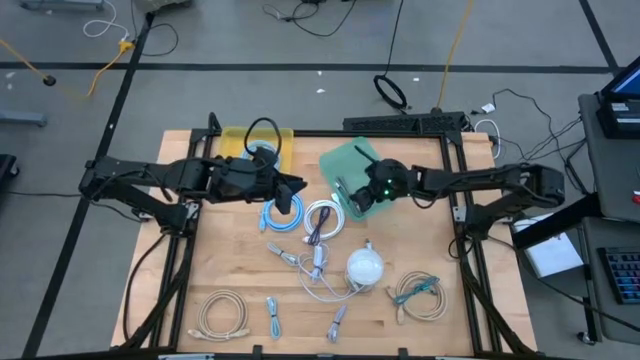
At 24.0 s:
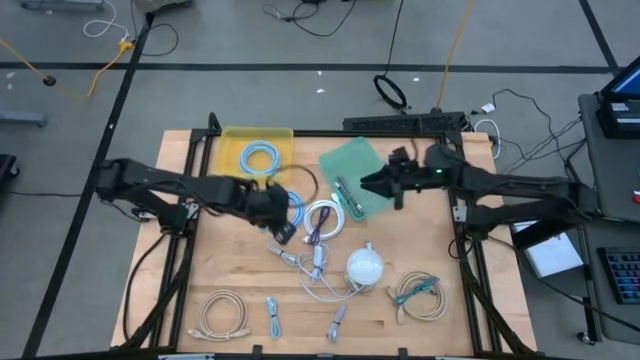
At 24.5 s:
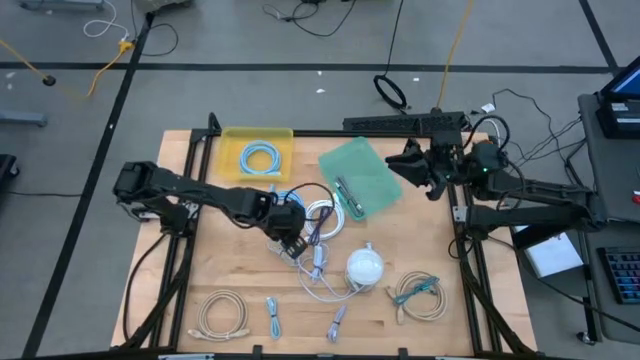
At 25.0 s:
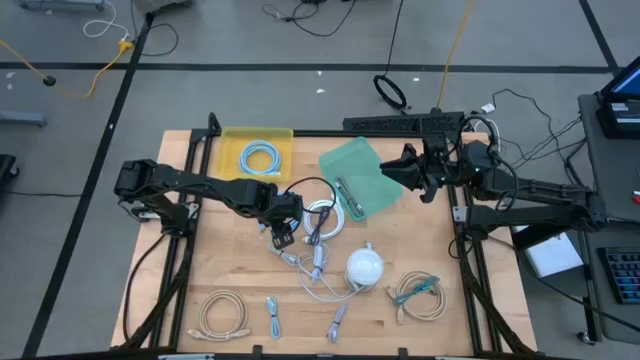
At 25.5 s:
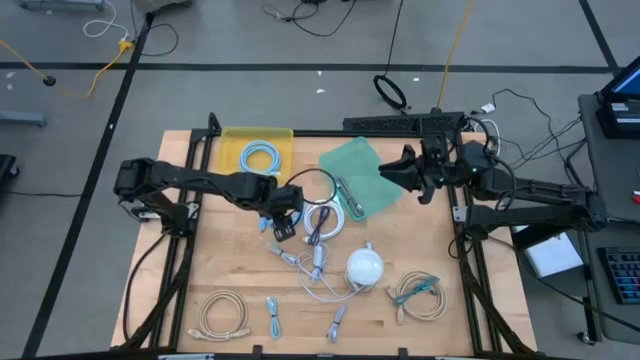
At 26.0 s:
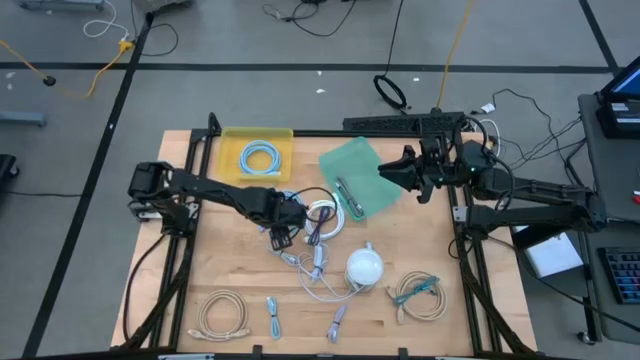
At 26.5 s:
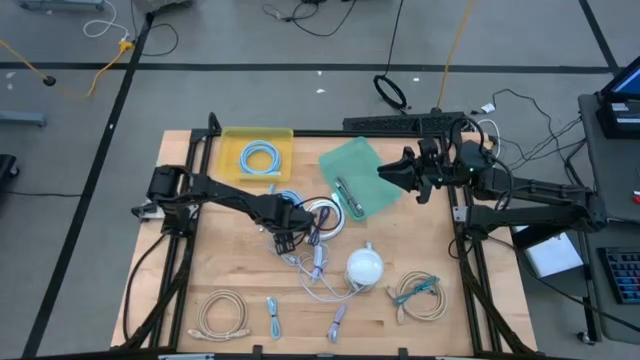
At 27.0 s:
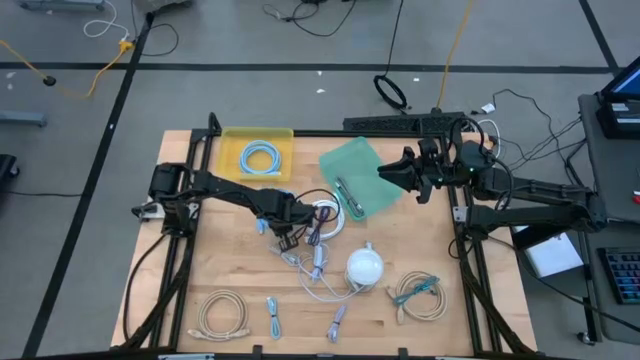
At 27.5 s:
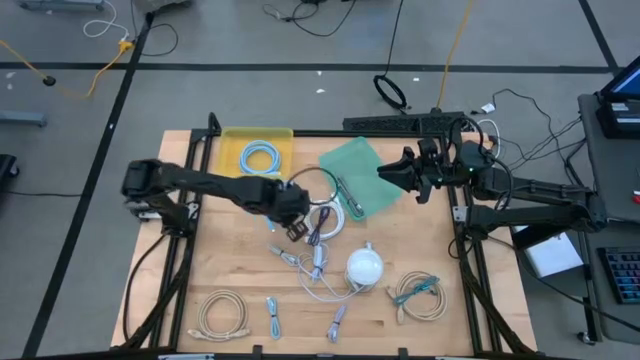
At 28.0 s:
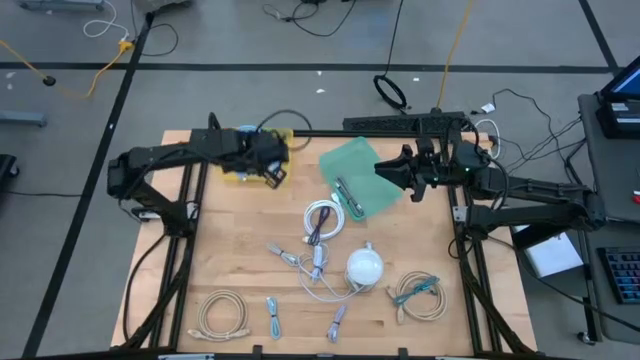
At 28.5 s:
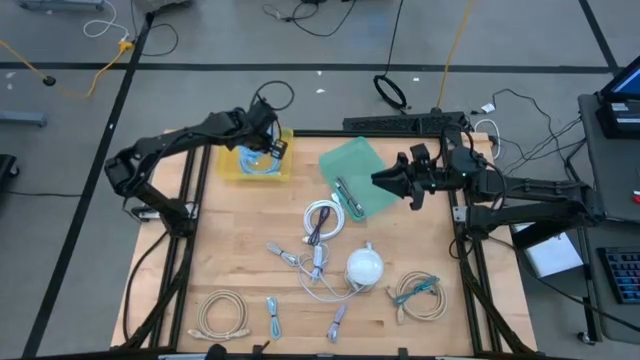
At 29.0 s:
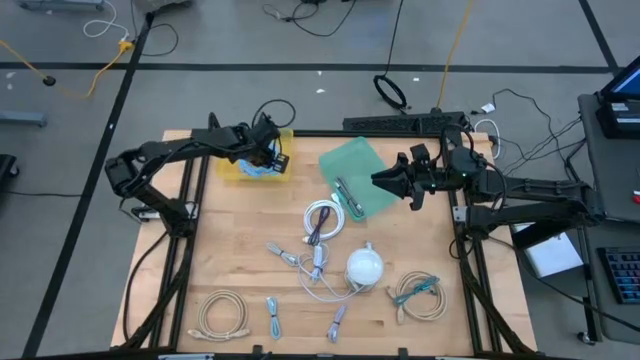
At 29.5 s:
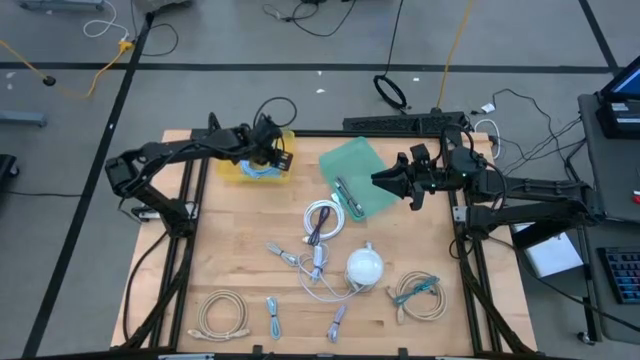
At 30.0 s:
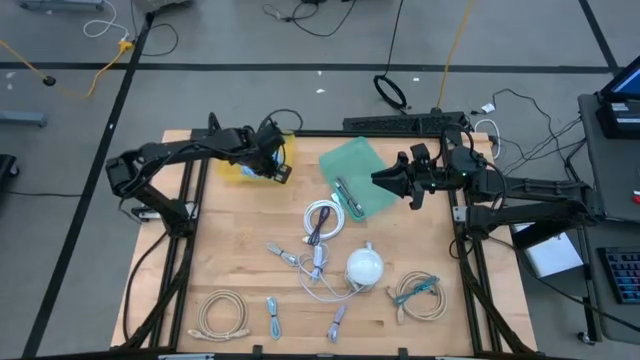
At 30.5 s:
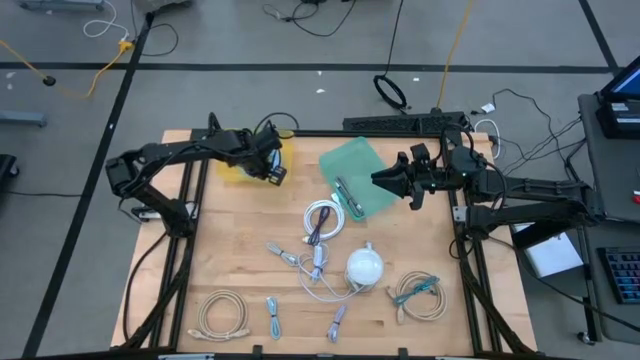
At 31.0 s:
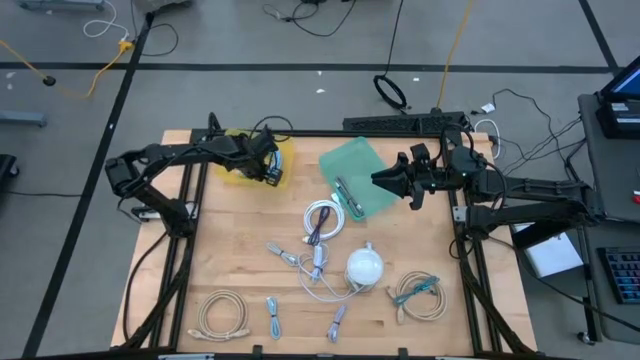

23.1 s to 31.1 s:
Task: Pick & Place USB Port
Put the blue HDMI cable into the yellow bin

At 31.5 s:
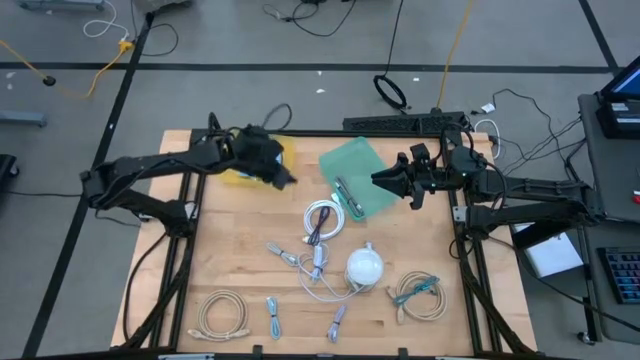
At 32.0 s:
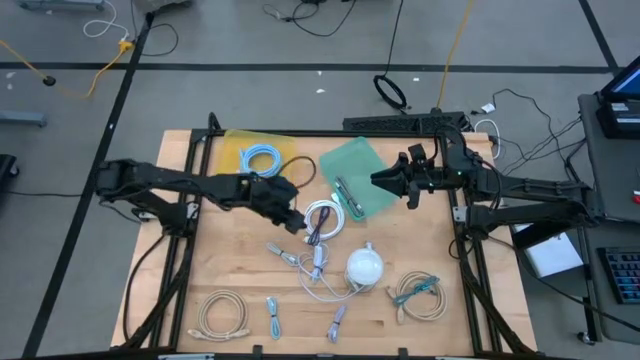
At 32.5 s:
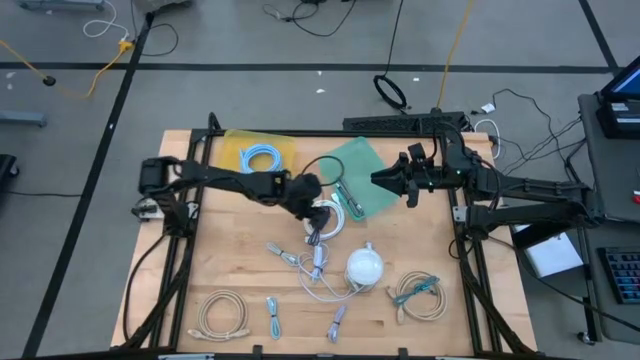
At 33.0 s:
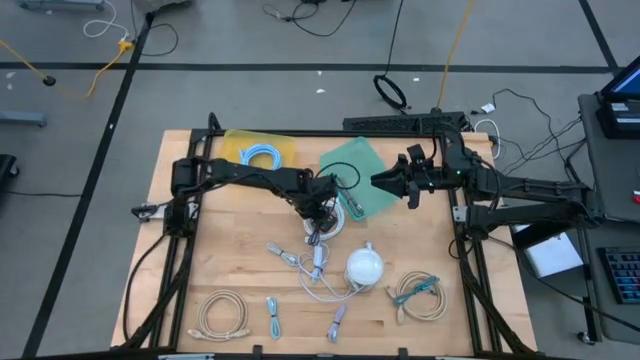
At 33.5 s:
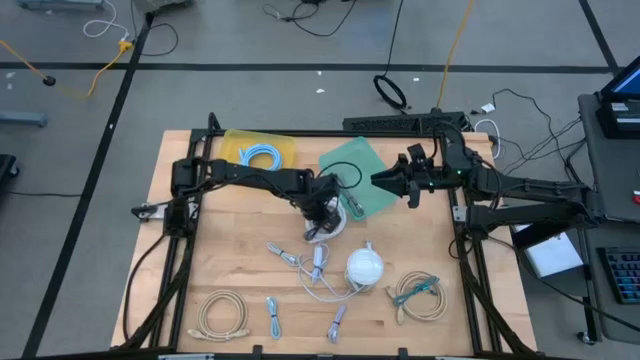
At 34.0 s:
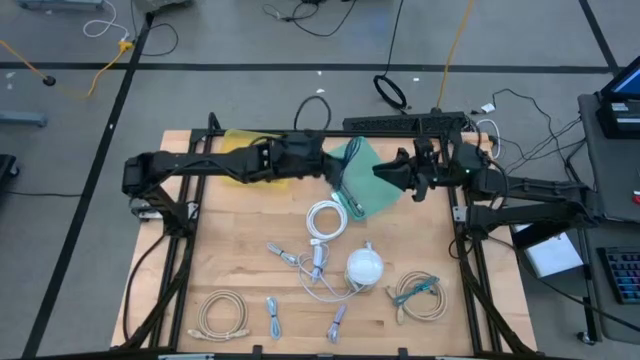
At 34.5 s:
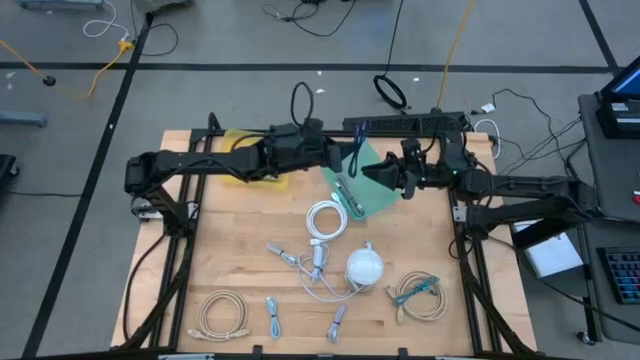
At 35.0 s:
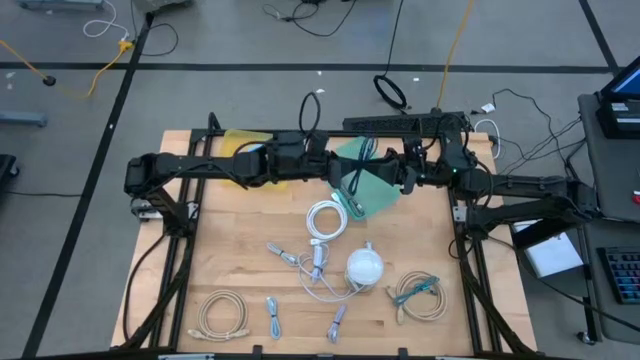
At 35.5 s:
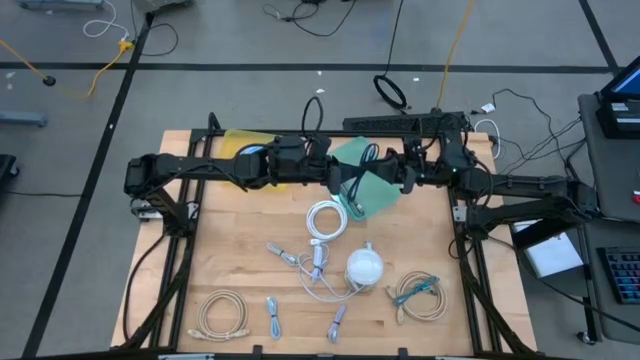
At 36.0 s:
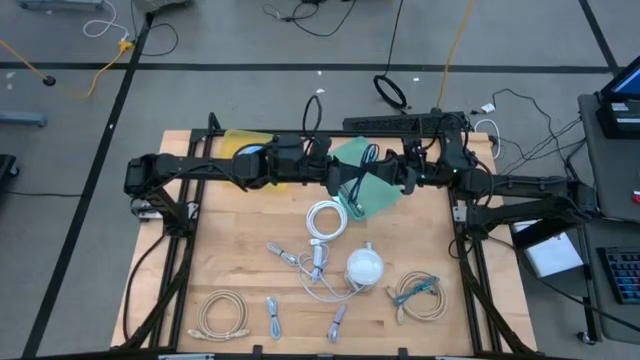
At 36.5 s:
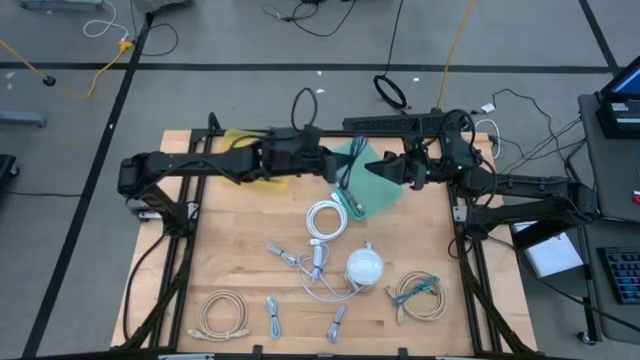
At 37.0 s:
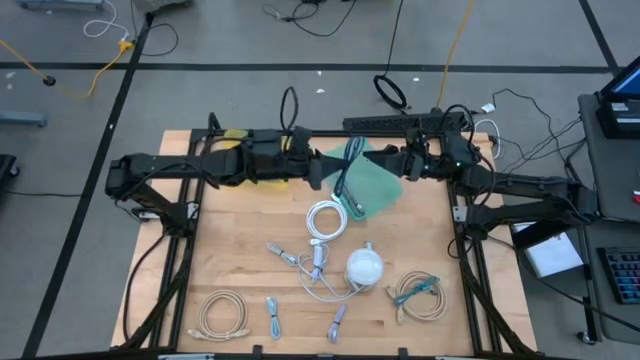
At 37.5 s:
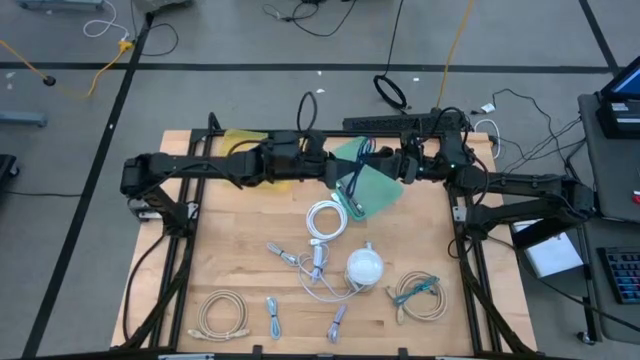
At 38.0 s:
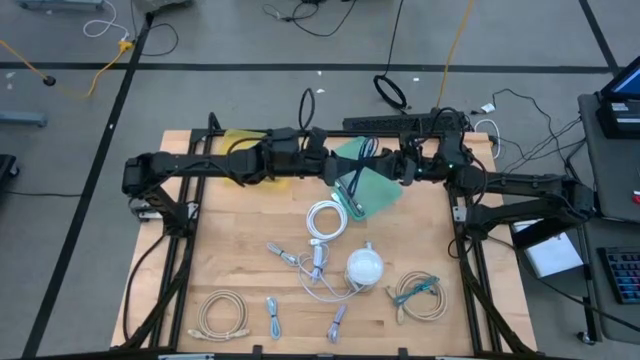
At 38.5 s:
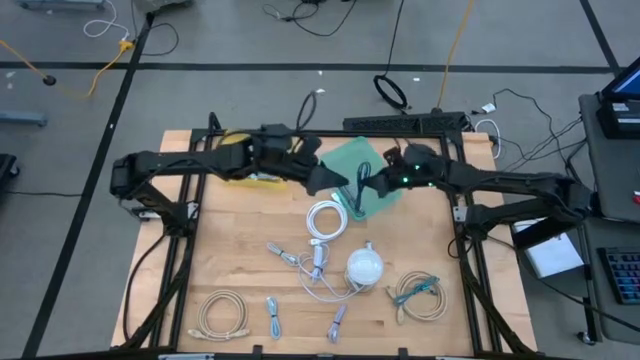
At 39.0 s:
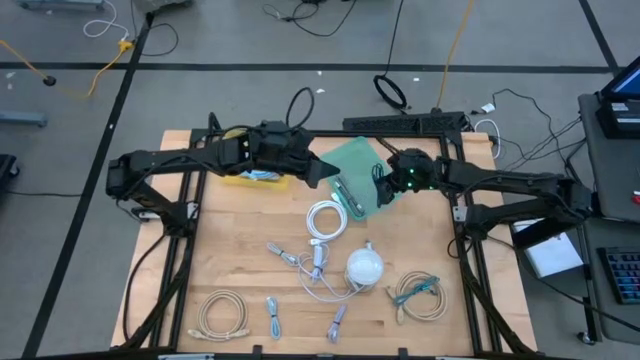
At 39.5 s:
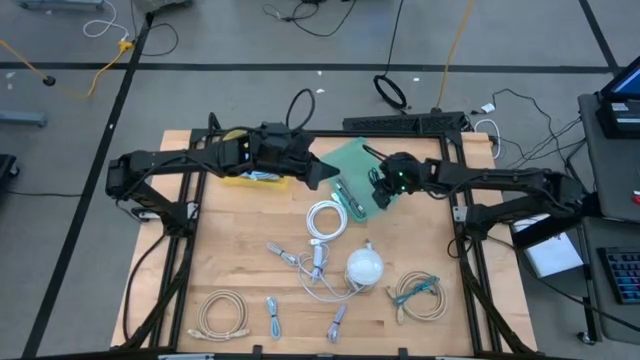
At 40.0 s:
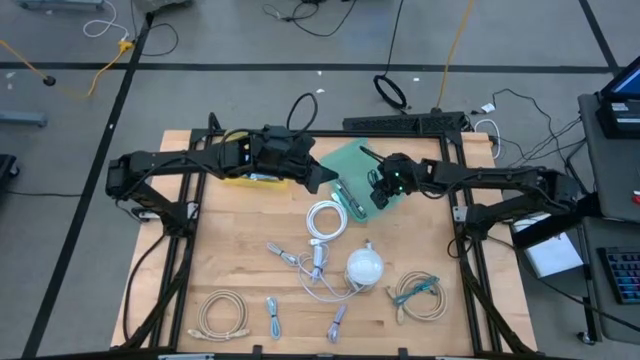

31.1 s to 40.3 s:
Put the dark blue charger cable into the green bin

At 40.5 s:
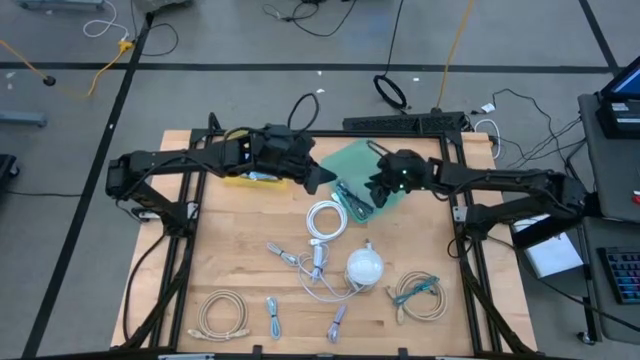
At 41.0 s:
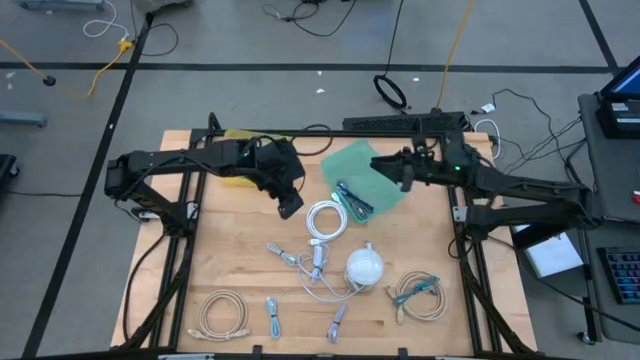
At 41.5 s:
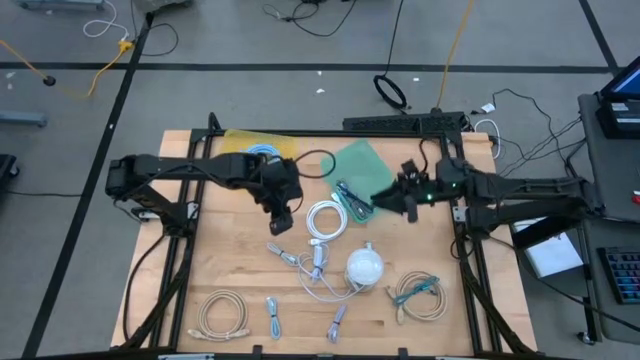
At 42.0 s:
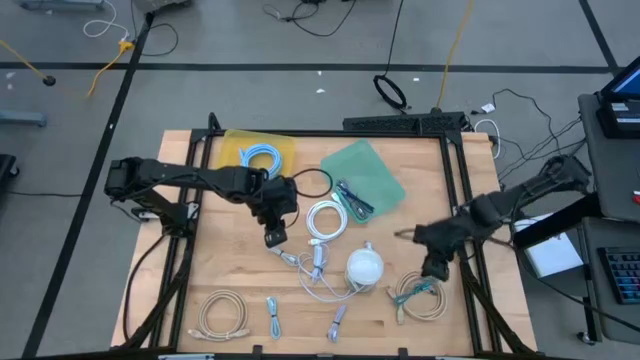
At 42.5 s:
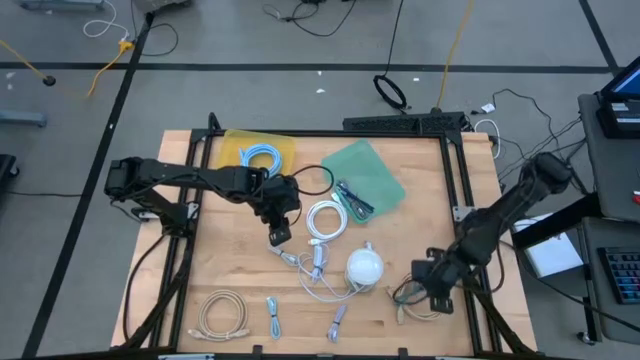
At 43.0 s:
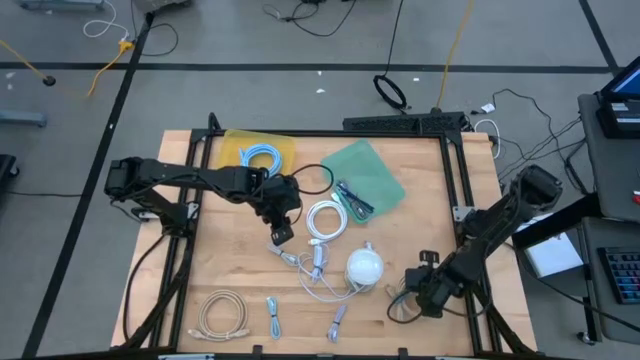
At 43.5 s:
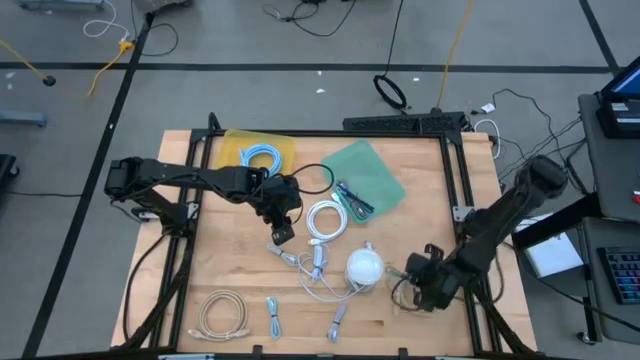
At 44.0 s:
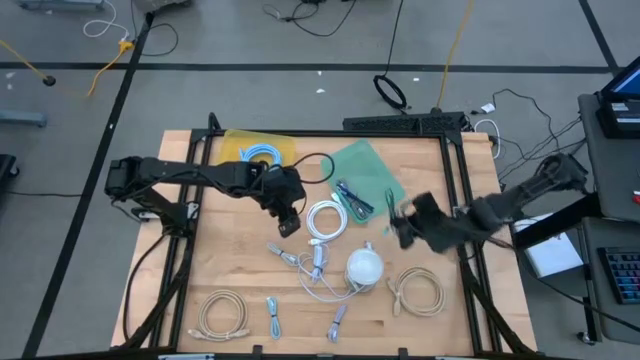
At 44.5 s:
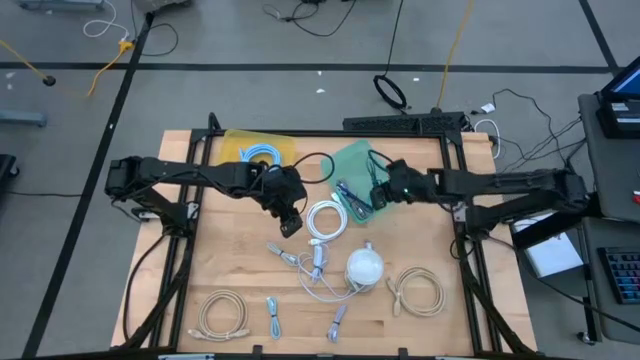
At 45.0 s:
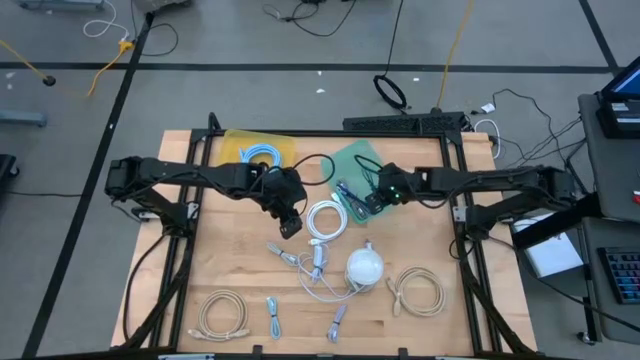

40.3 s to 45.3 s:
Put the green charger cable into the green bin
